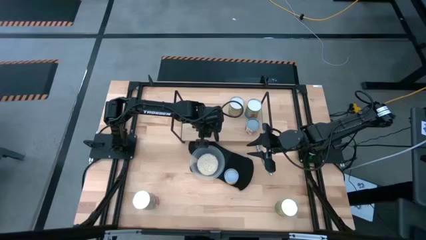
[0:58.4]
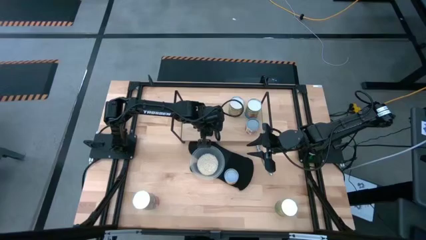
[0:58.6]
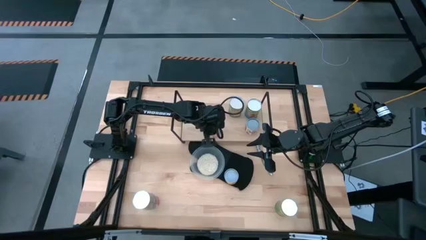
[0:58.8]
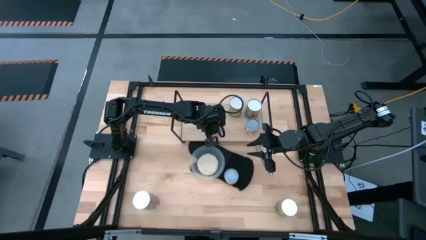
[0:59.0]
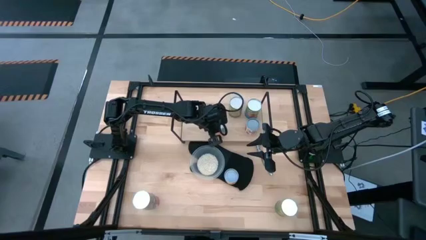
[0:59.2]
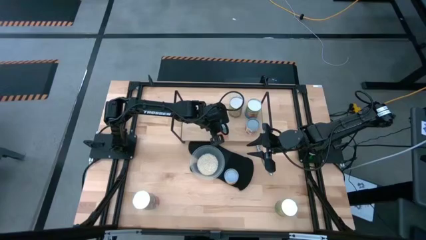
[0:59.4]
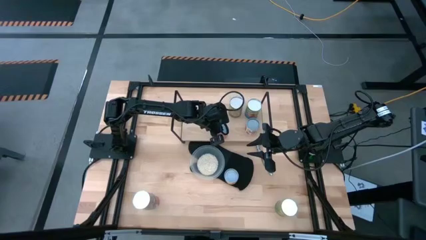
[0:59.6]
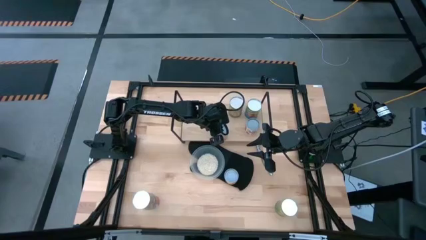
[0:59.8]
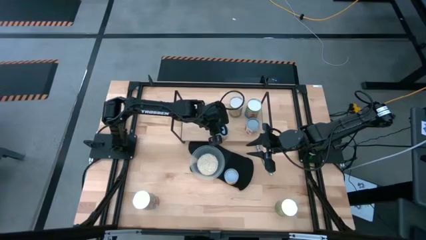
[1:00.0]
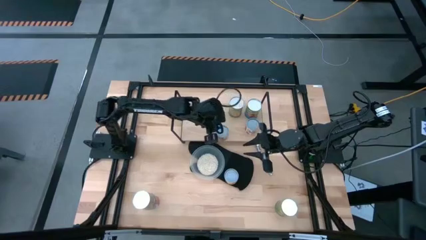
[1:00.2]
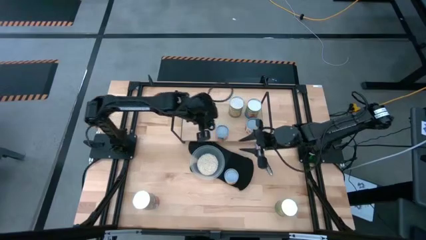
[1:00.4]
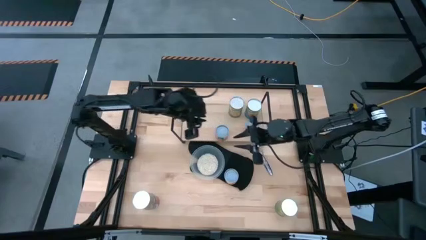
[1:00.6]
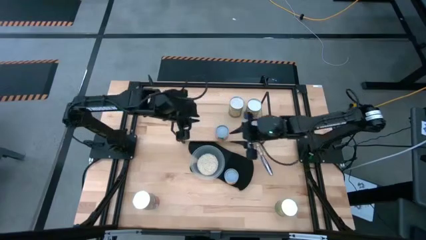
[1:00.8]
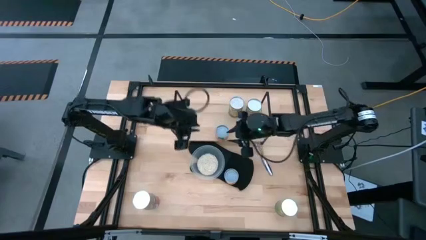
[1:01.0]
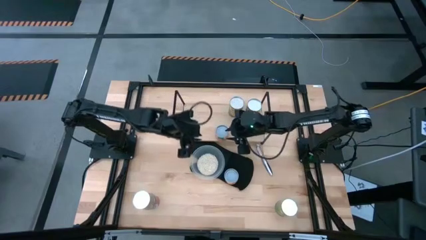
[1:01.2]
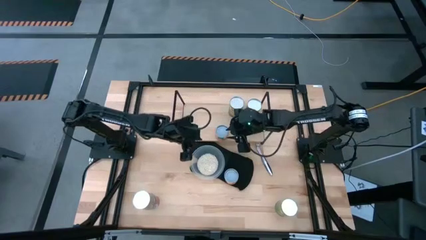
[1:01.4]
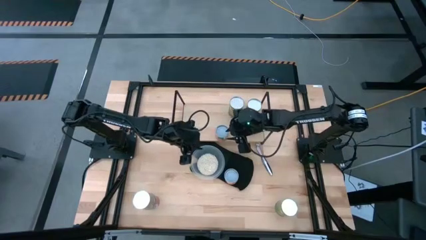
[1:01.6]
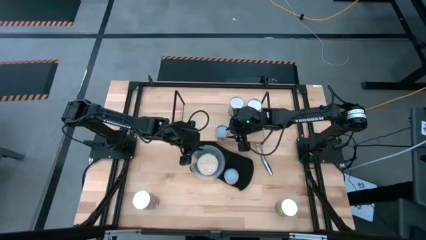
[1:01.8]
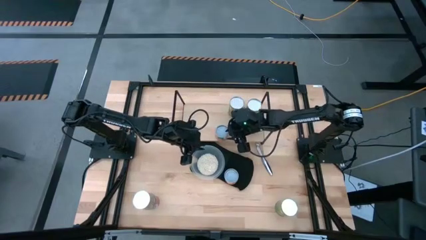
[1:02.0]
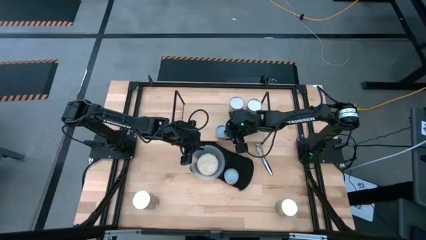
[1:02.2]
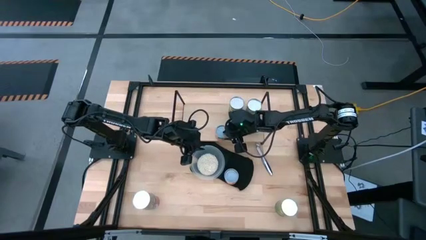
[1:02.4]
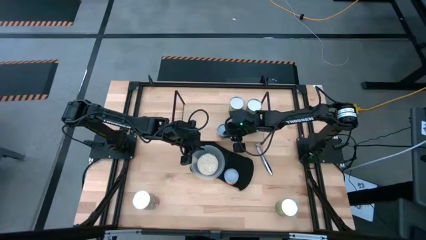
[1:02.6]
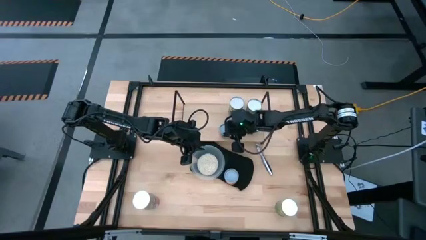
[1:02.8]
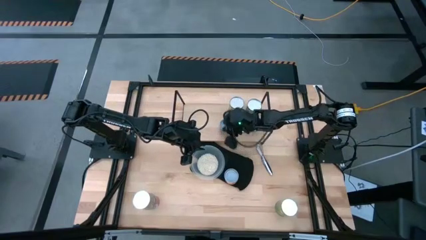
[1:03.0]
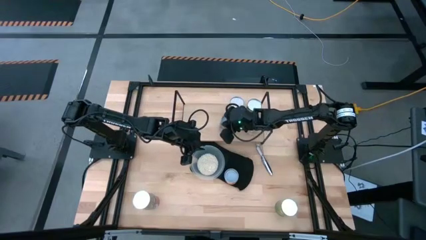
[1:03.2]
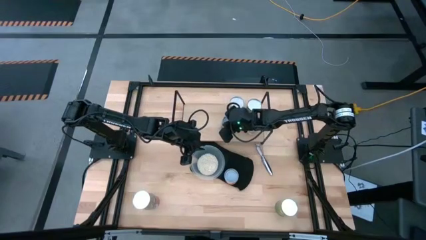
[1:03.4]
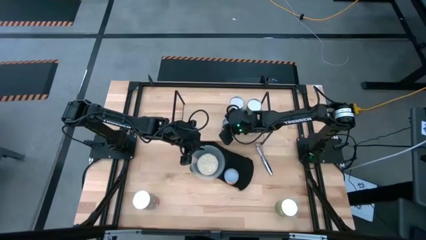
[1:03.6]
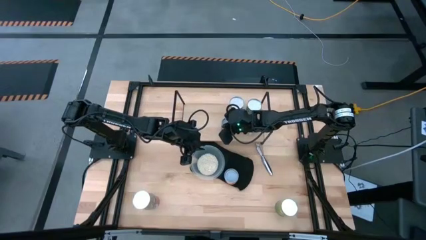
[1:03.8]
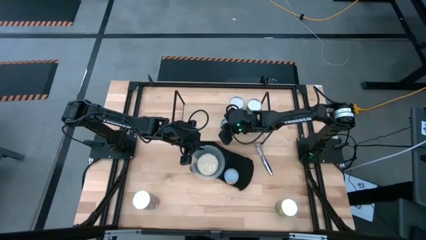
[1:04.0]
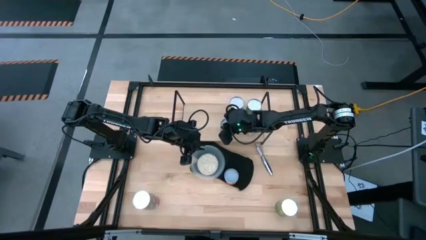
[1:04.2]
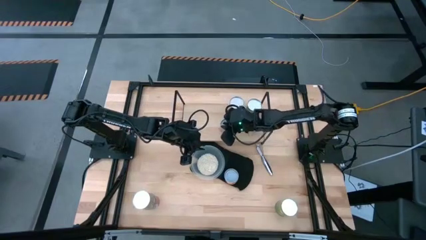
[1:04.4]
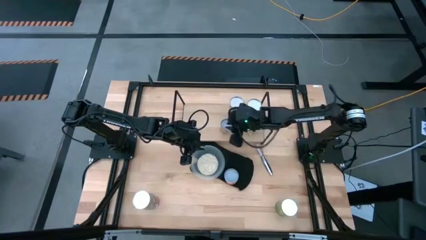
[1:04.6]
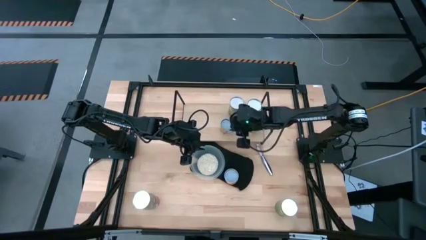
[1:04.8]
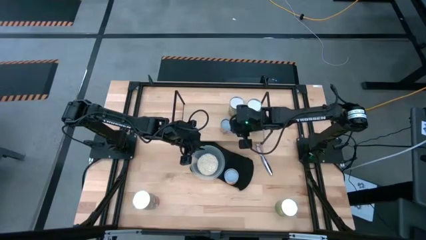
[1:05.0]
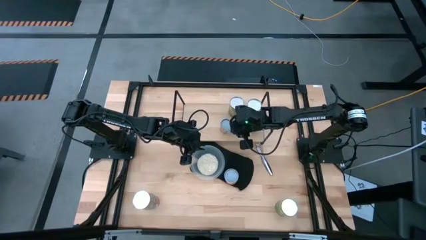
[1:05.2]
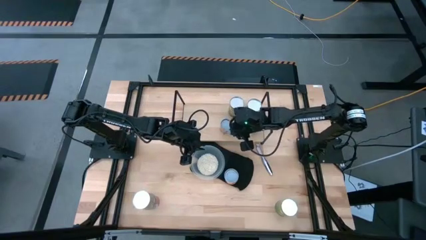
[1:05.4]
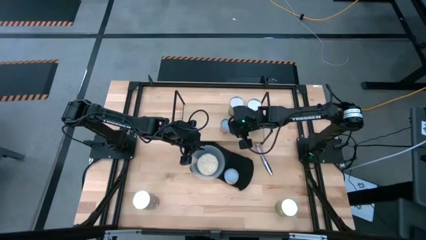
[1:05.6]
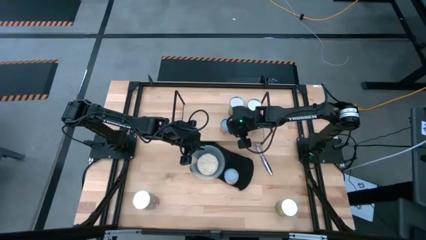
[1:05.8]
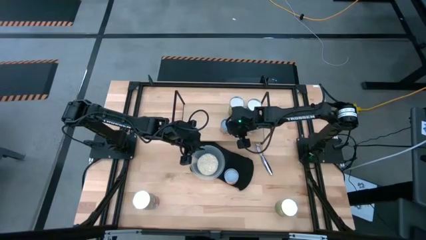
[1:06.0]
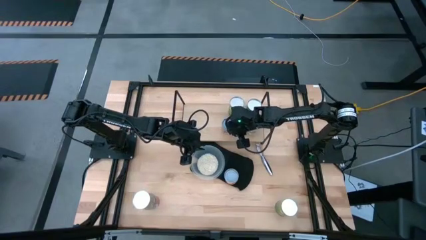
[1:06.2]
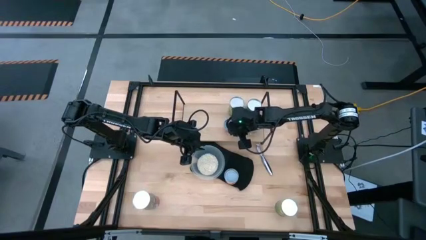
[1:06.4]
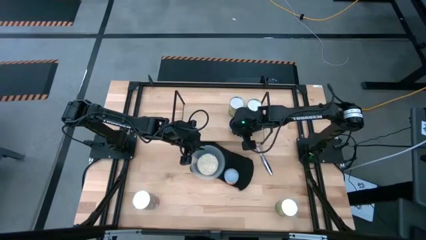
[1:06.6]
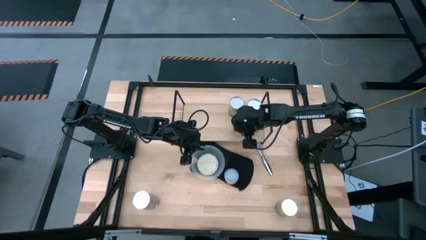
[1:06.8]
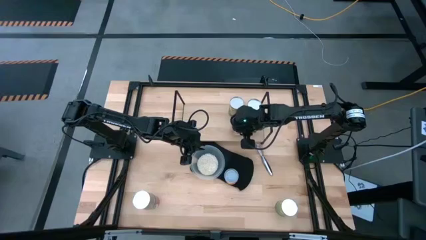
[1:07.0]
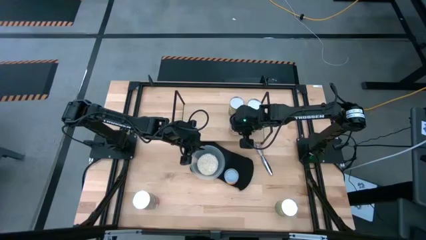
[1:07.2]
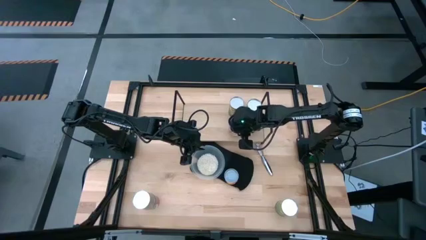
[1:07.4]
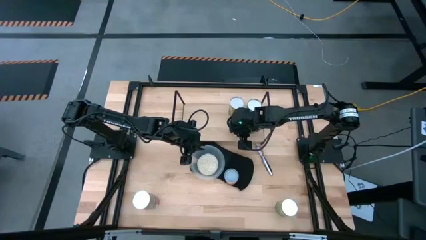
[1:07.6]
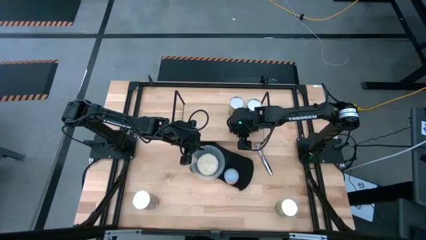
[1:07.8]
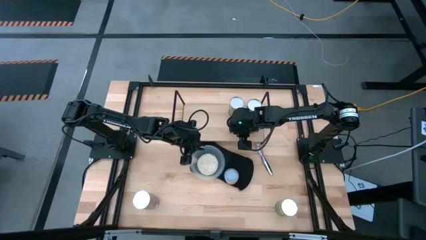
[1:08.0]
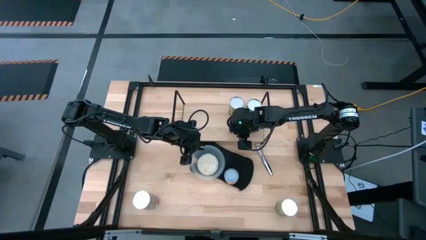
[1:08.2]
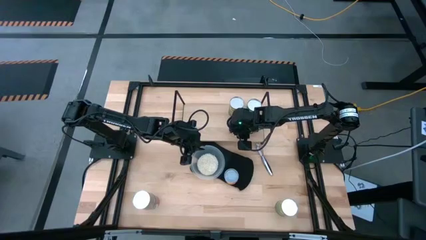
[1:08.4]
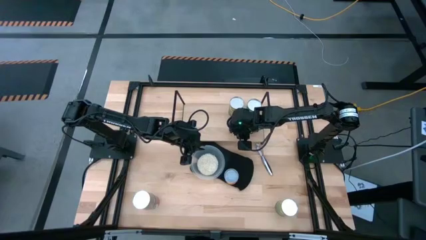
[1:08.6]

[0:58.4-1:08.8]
Task: Pick and place cans onto a shelf
Put the small canned oranges on the shelf
